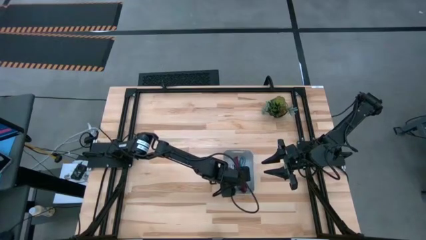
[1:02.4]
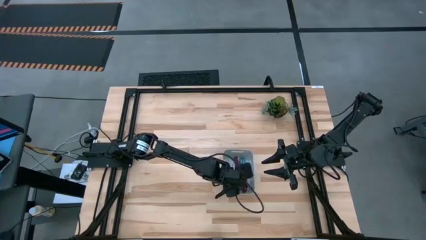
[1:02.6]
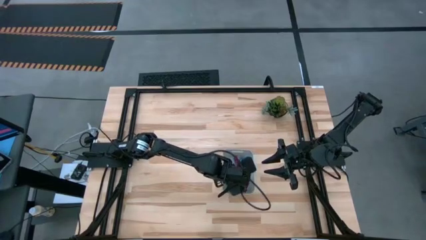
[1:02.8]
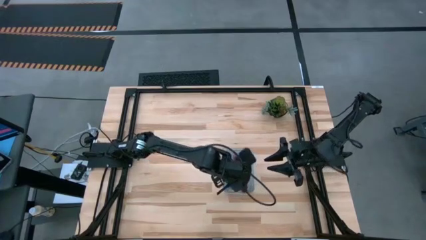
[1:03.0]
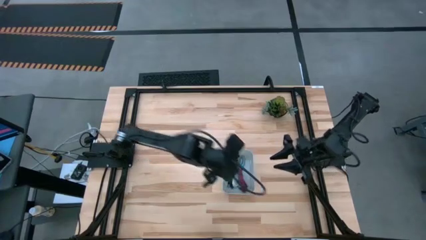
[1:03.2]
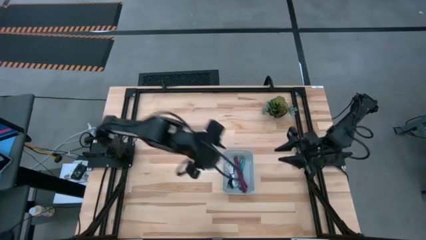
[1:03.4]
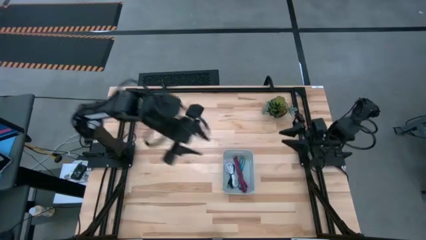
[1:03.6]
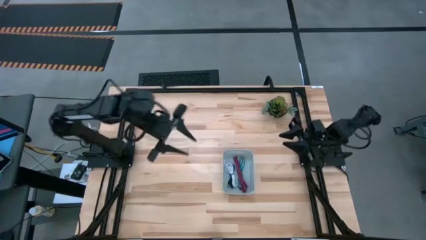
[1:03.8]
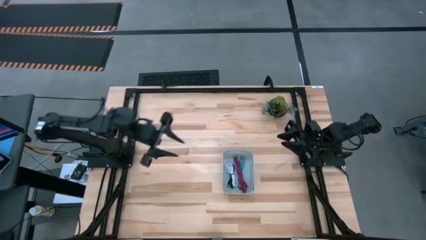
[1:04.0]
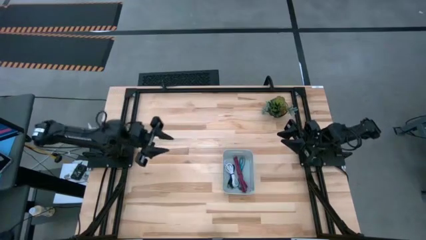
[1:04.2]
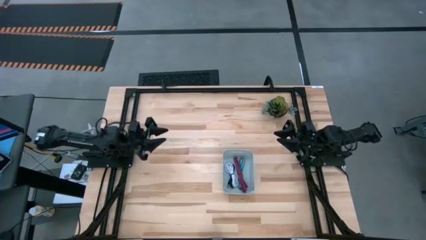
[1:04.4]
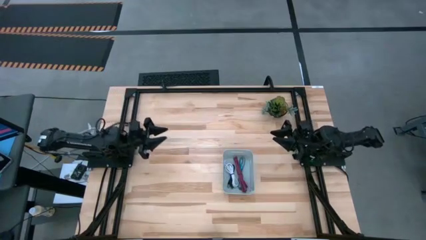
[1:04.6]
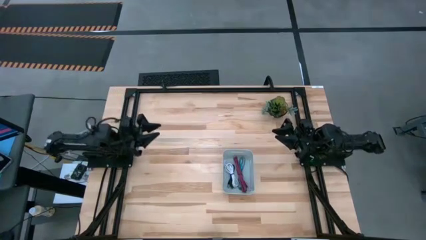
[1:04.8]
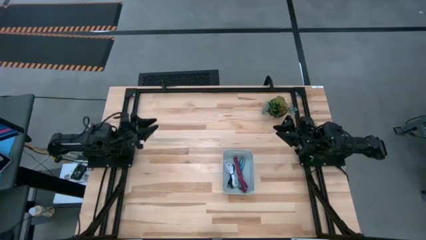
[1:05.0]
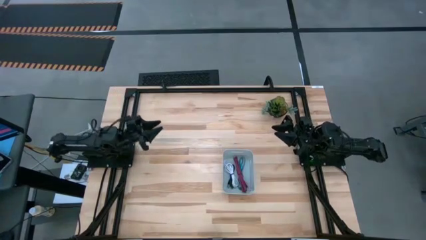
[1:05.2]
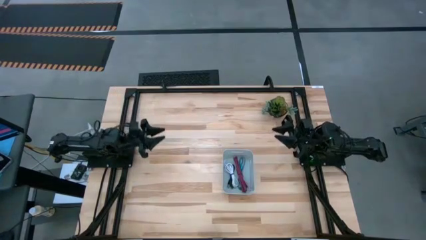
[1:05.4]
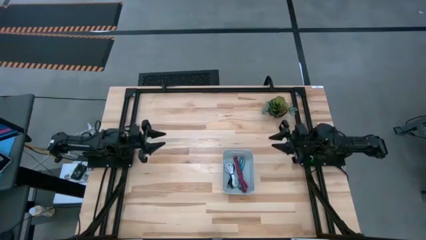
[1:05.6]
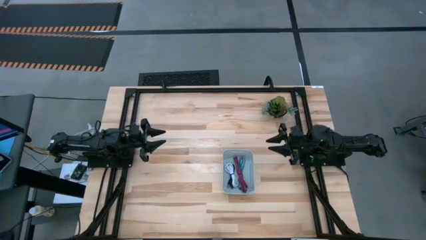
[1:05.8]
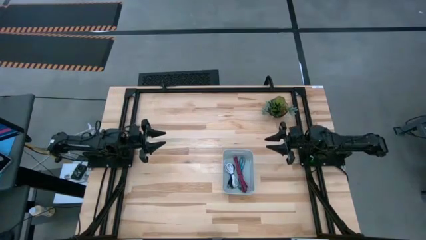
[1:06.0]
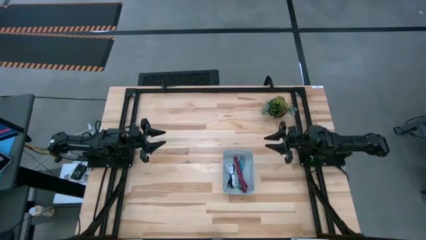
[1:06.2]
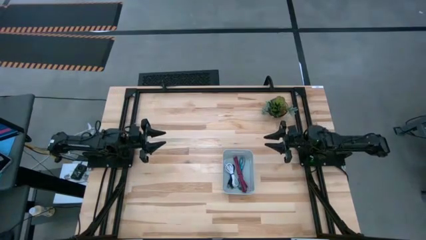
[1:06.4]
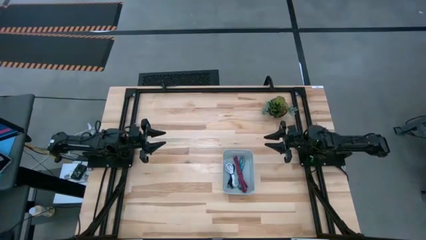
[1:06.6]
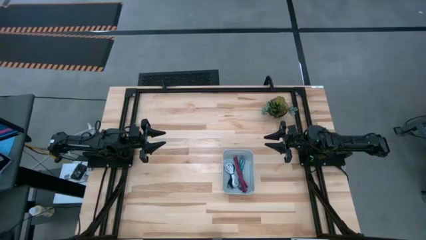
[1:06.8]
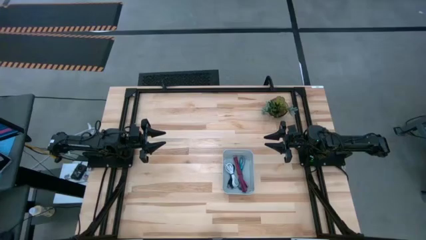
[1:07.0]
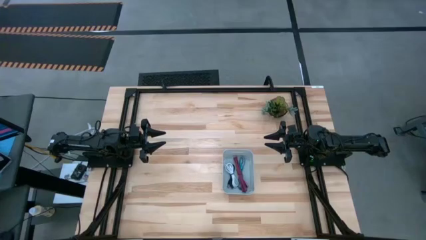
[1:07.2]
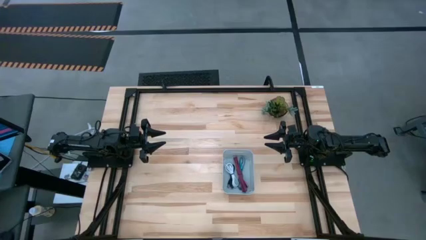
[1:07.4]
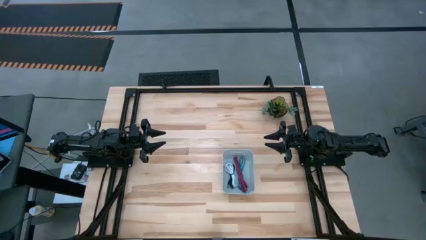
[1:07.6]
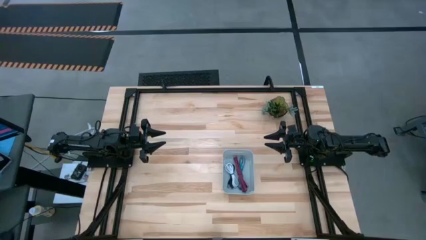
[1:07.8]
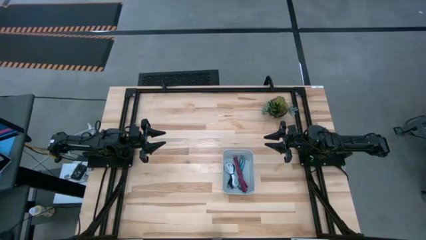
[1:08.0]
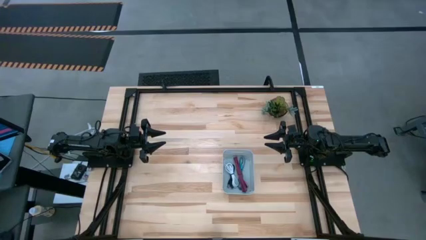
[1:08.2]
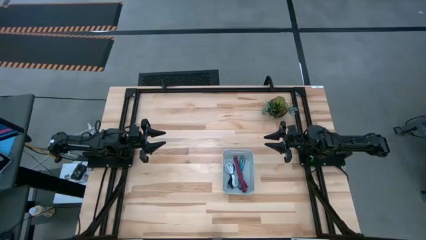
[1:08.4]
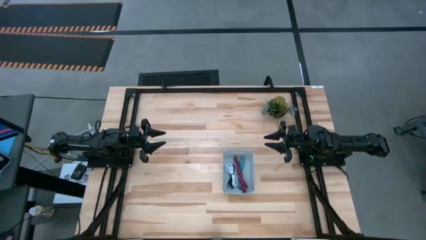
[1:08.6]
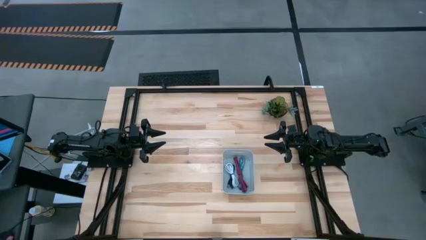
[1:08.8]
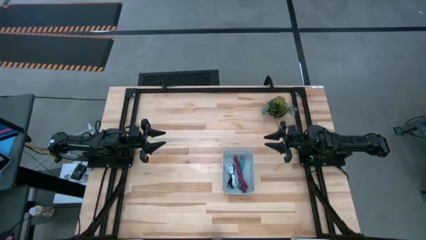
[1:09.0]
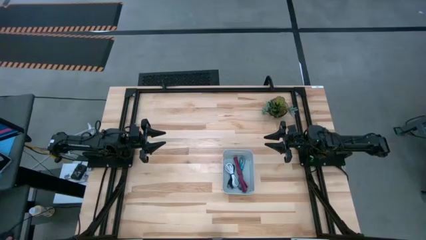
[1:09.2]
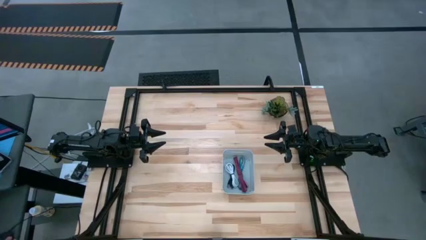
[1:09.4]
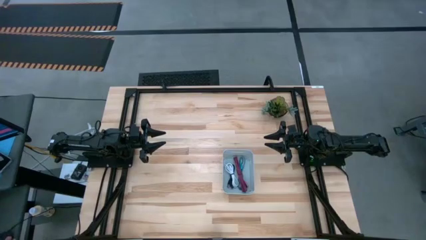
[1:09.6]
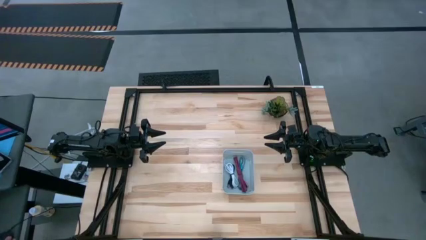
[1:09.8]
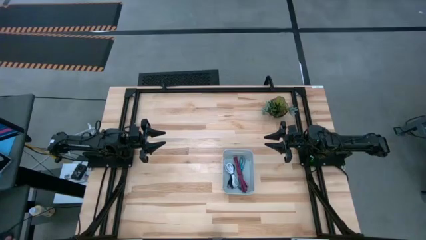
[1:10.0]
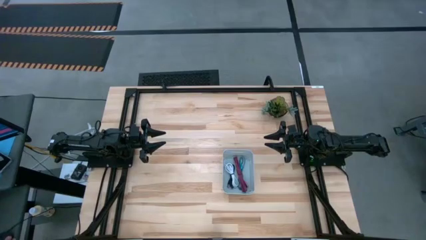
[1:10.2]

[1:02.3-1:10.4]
Task: Pick and place USB-C Cables
Return to Home Position

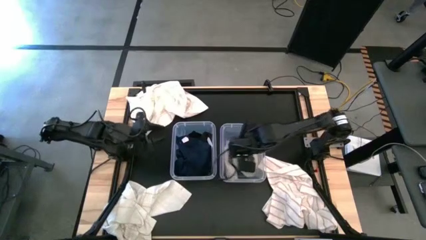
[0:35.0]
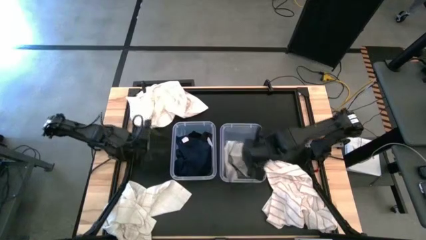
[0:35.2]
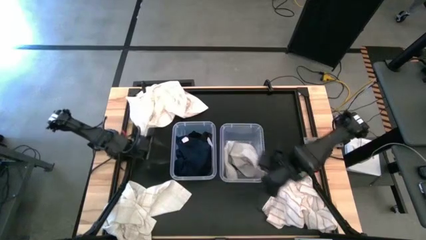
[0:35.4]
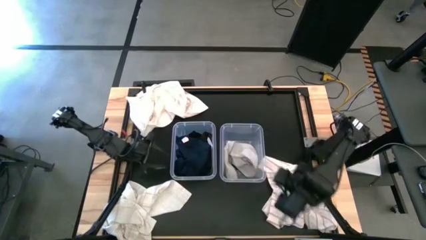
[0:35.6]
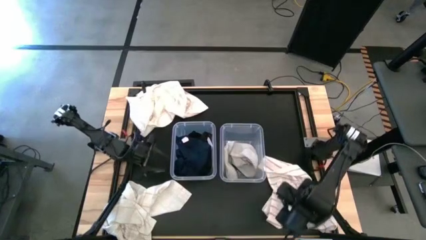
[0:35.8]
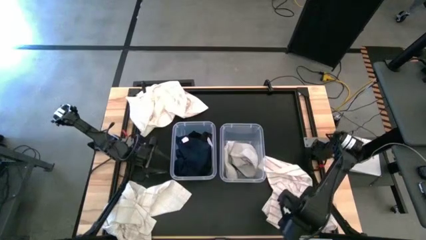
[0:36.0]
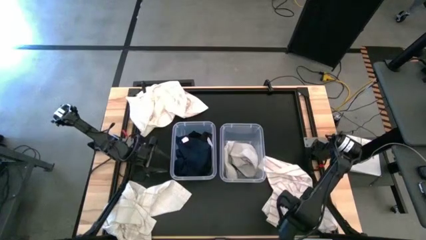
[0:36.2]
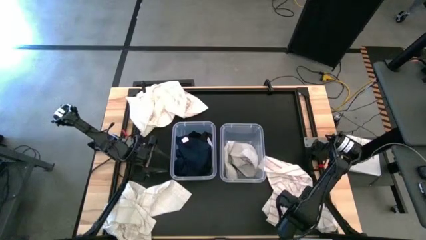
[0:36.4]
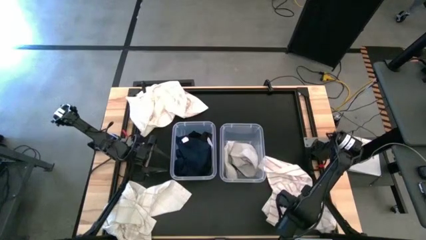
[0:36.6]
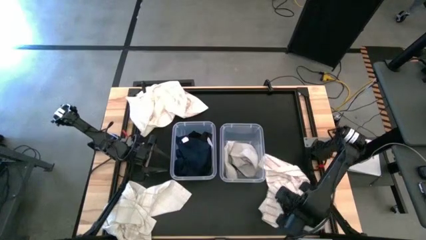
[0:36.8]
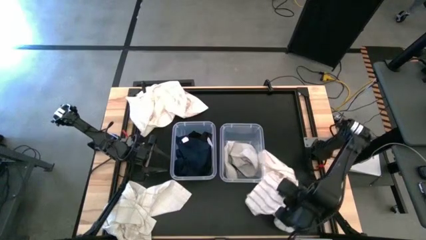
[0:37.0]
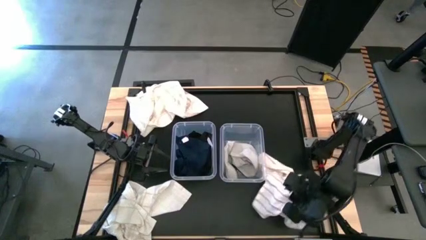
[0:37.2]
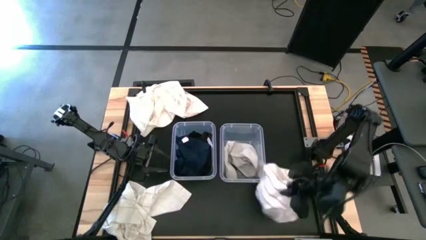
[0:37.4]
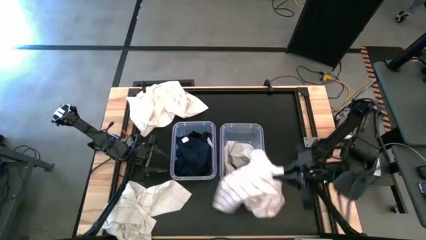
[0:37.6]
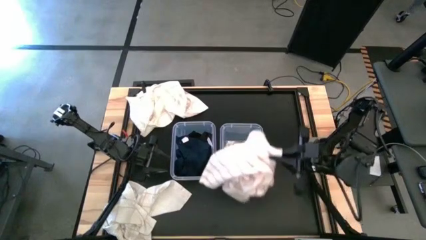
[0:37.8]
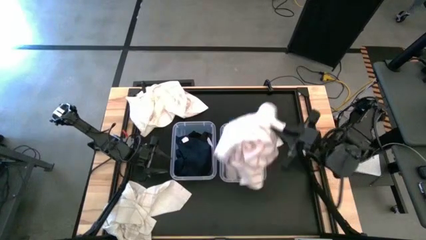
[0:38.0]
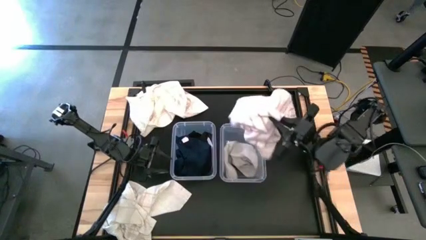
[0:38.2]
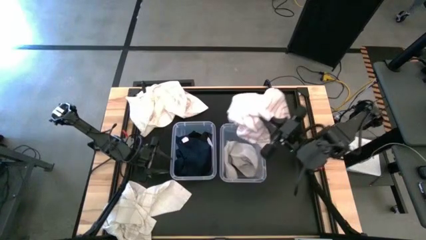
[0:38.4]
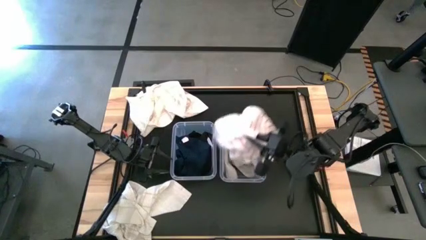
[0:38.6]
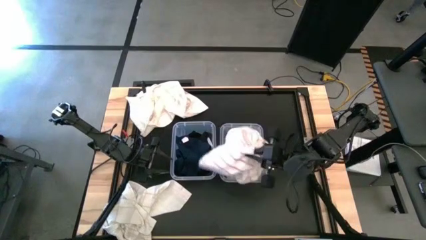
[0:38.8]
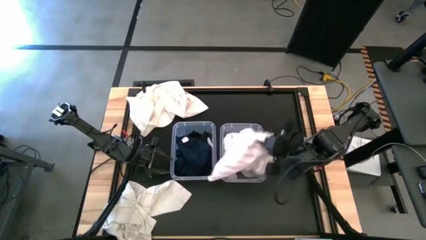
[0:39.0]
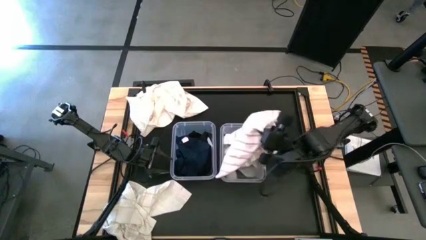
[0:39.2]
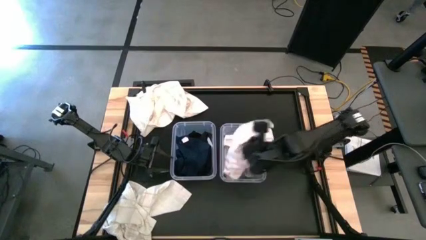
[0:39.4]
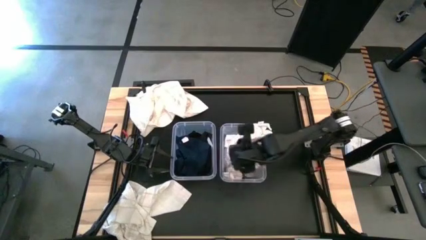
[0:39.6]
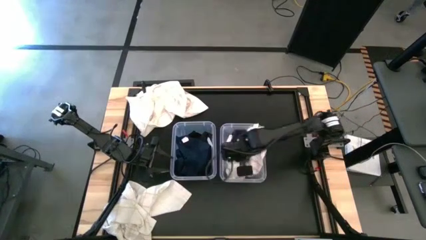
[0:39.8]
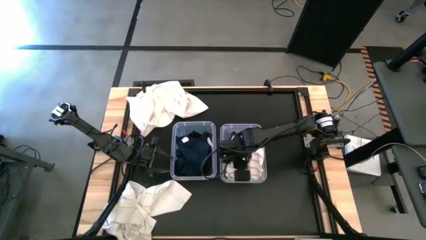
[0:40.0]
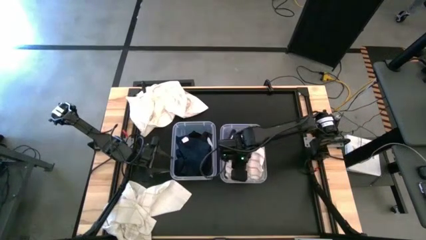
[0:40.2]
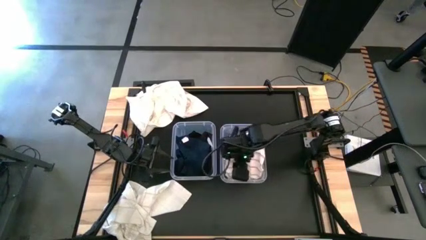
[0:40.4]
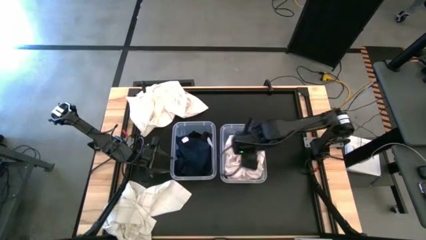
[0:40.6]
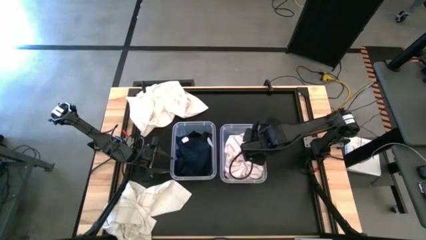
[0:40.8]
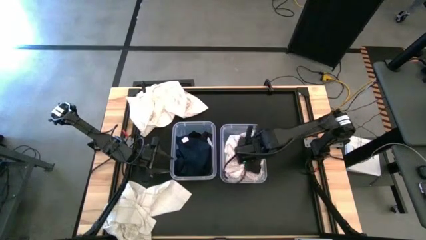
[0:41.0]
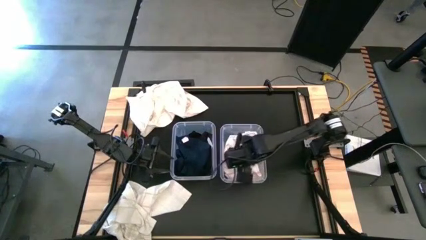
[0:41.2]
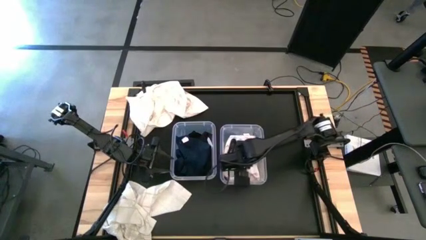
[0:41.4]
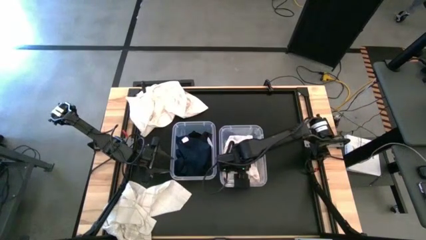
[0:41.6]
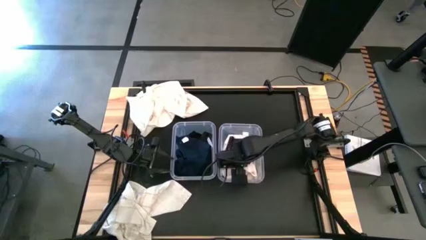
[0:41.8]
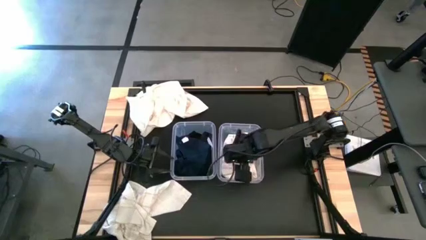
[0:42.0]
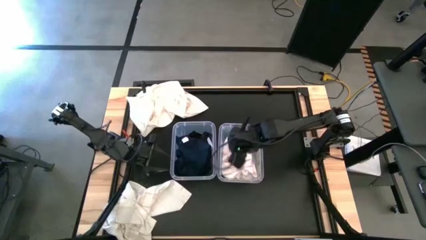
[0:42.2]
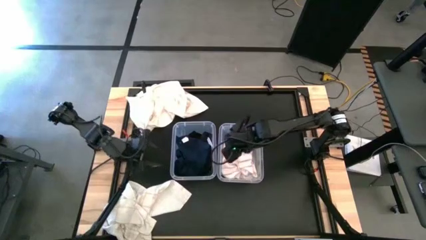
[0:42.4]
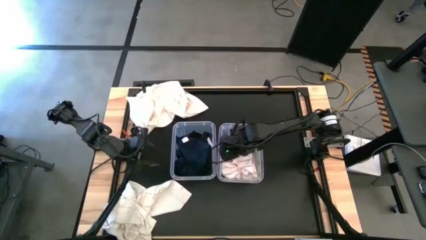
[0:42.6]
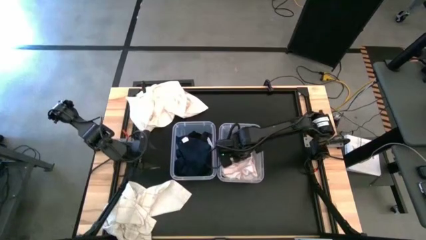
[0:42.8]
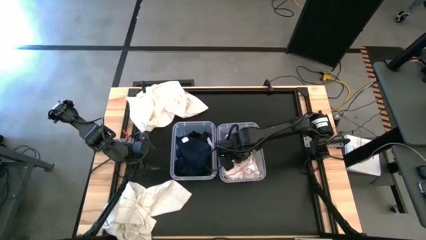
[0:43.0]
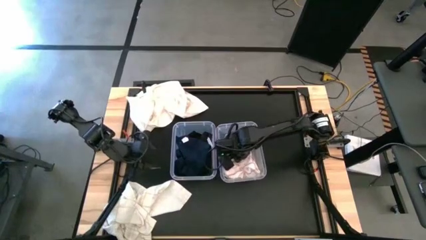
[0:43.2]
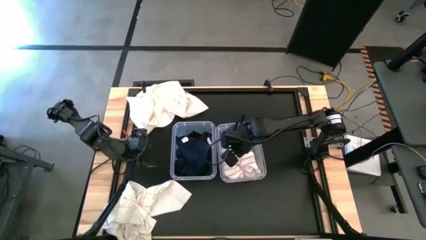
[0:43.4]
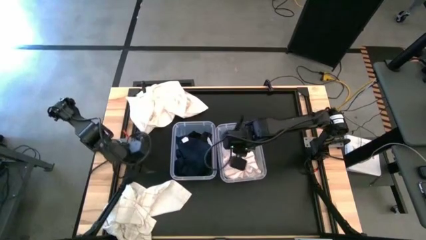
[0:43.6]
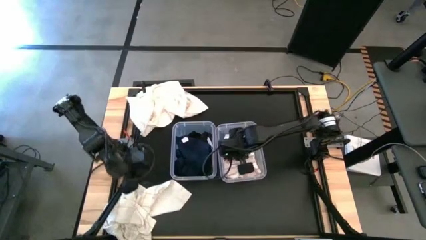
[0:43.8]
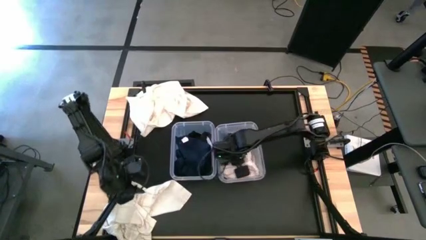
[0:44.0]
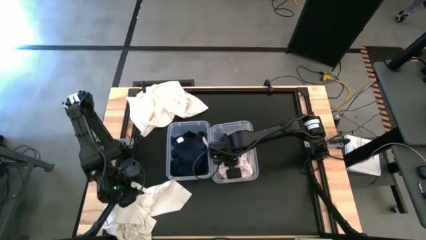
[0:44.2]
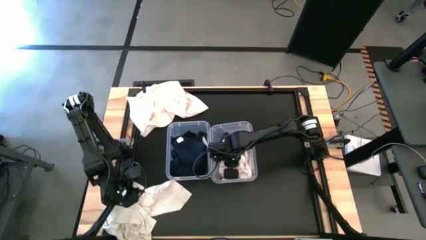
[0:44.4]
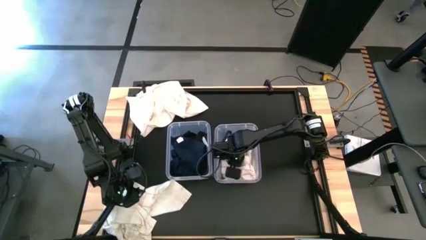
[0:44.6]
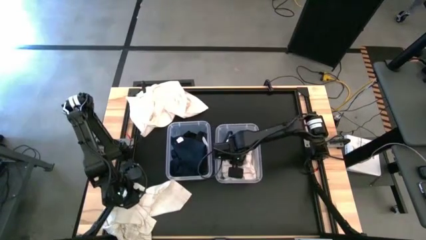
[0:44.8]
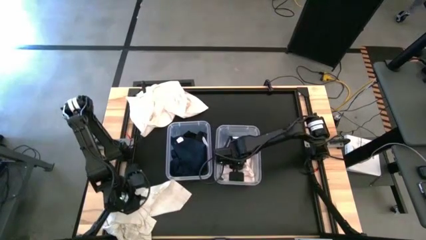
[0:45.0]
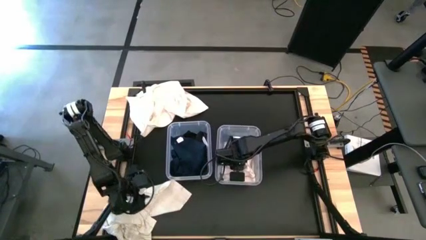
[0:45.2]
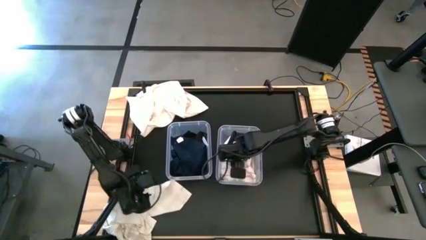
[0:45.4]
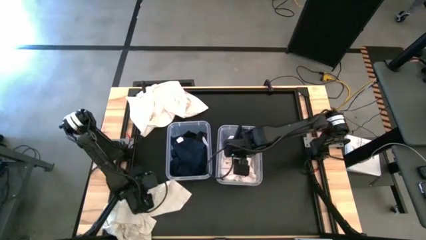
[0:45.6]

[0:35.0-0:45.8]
Task: Sort towels by color in basket
Put the bottom right white towel into the right transparent bin
